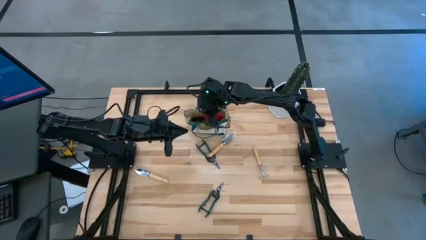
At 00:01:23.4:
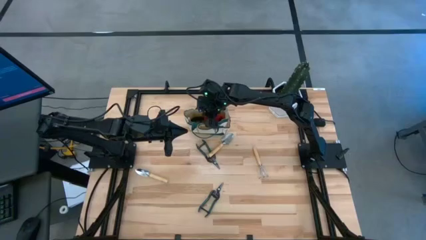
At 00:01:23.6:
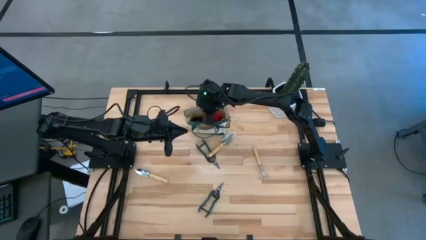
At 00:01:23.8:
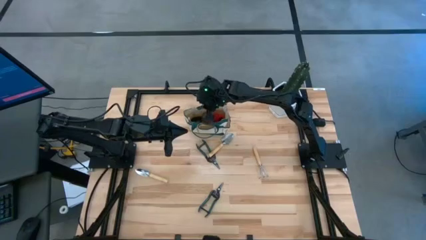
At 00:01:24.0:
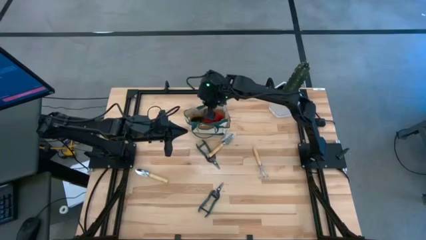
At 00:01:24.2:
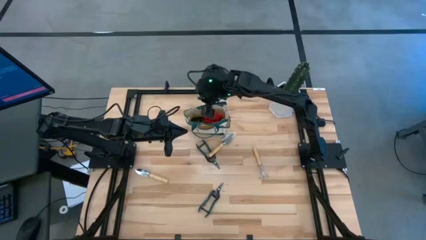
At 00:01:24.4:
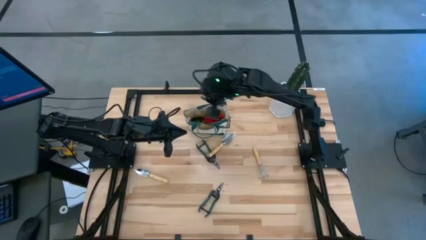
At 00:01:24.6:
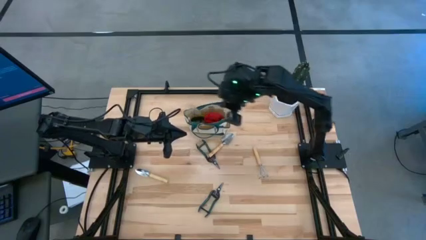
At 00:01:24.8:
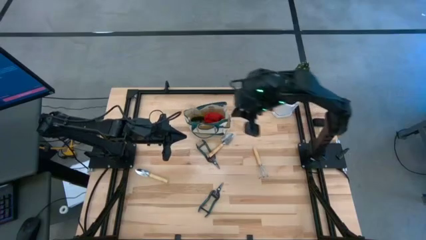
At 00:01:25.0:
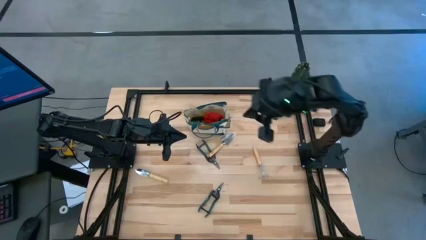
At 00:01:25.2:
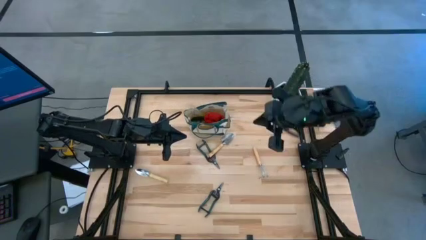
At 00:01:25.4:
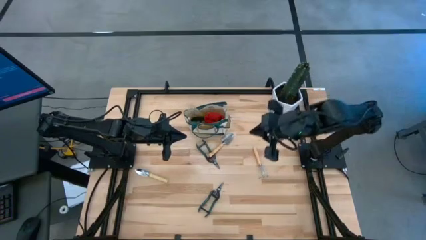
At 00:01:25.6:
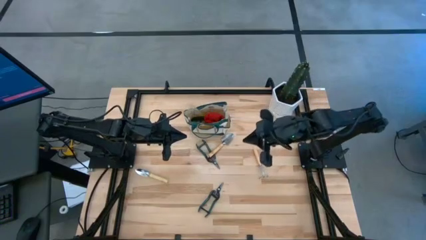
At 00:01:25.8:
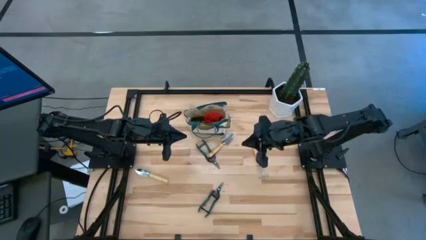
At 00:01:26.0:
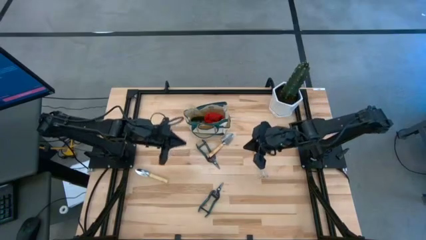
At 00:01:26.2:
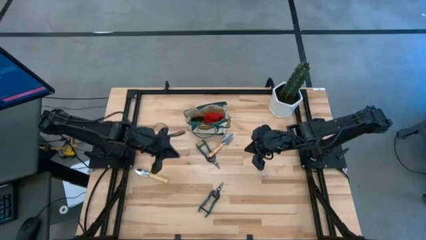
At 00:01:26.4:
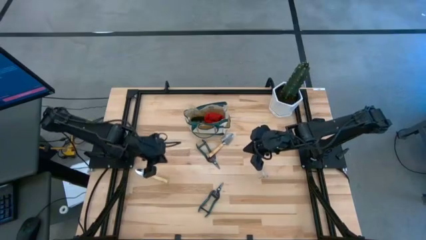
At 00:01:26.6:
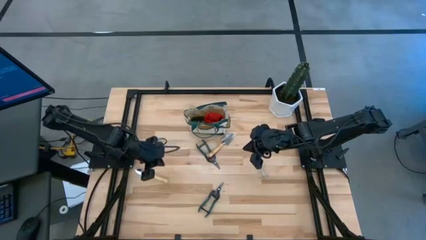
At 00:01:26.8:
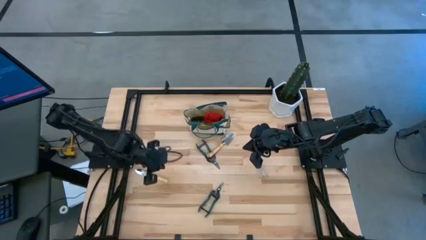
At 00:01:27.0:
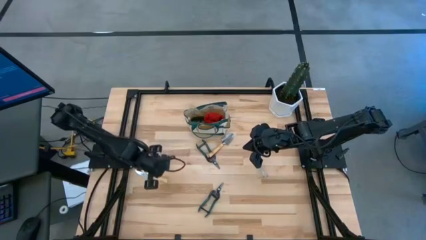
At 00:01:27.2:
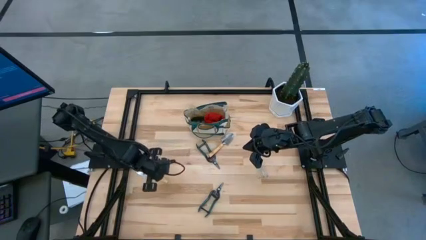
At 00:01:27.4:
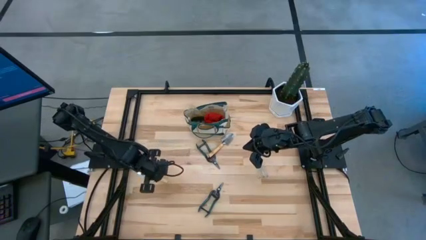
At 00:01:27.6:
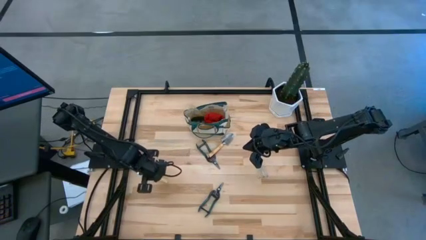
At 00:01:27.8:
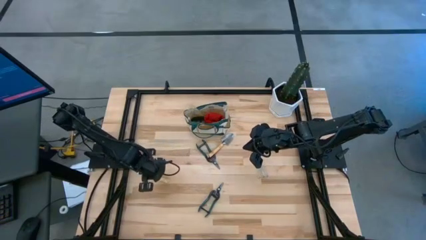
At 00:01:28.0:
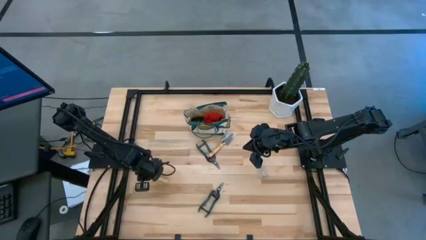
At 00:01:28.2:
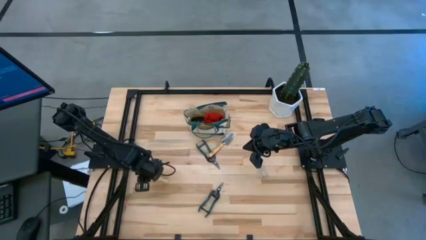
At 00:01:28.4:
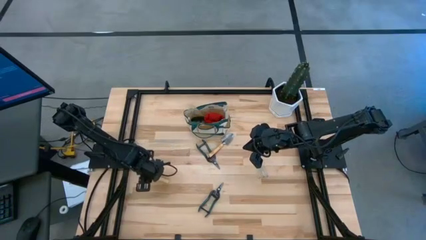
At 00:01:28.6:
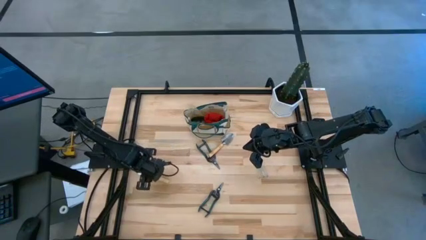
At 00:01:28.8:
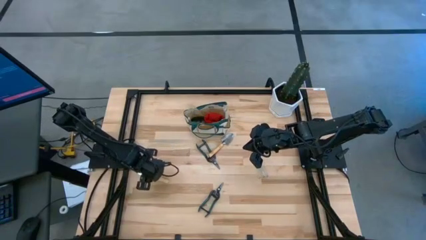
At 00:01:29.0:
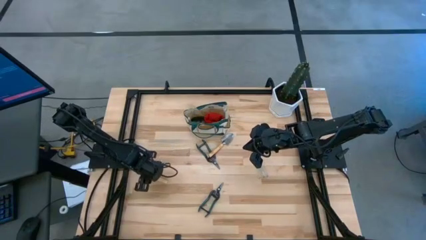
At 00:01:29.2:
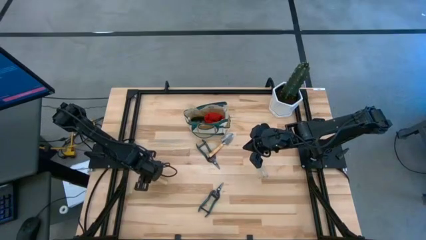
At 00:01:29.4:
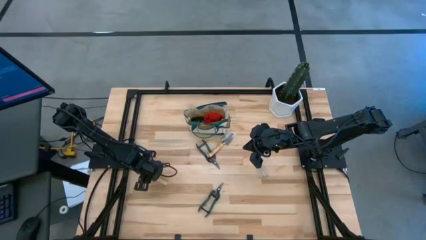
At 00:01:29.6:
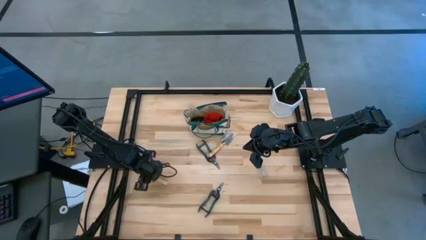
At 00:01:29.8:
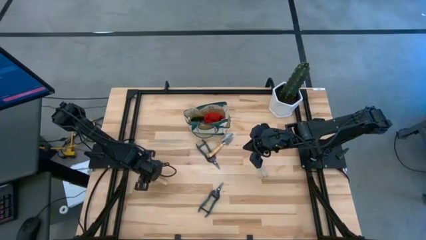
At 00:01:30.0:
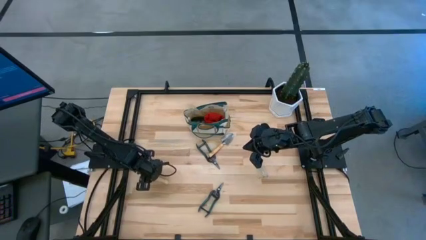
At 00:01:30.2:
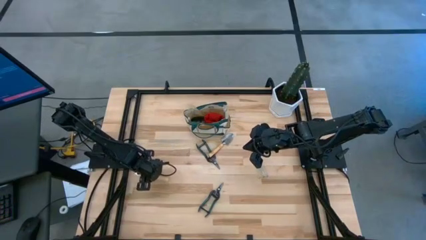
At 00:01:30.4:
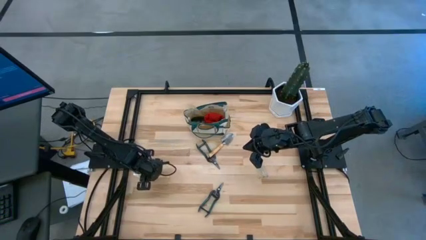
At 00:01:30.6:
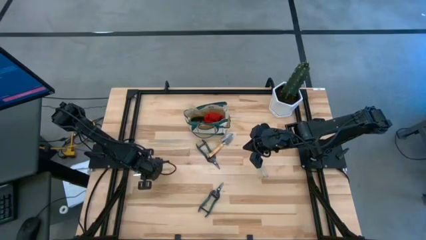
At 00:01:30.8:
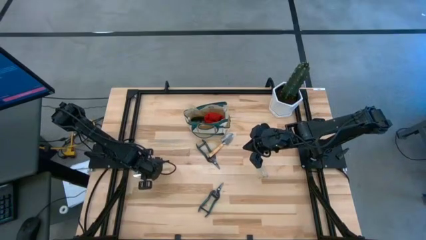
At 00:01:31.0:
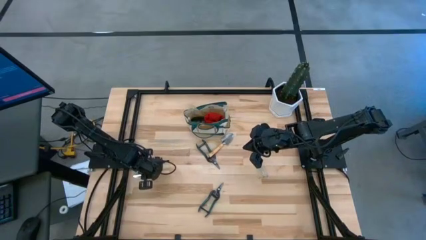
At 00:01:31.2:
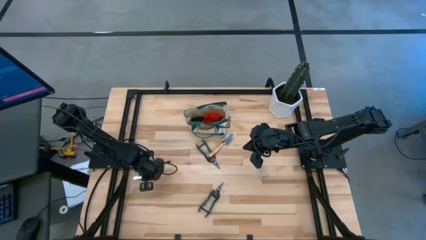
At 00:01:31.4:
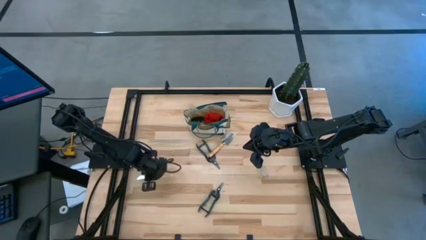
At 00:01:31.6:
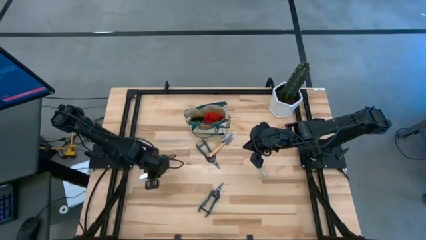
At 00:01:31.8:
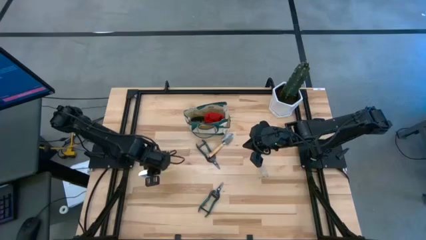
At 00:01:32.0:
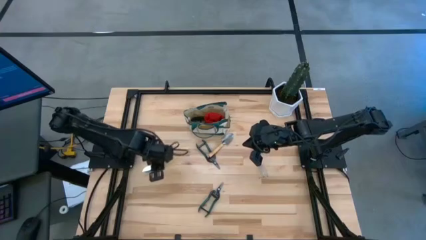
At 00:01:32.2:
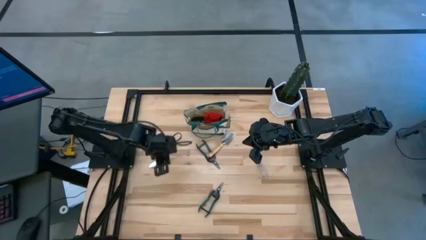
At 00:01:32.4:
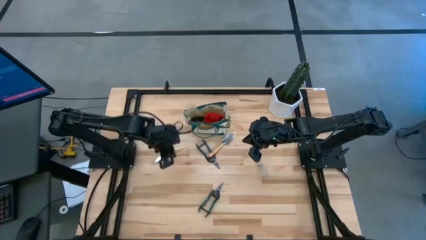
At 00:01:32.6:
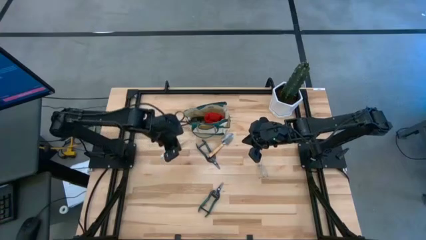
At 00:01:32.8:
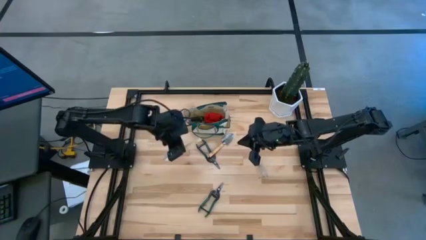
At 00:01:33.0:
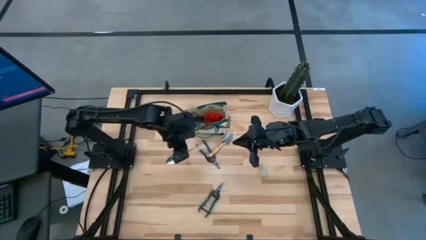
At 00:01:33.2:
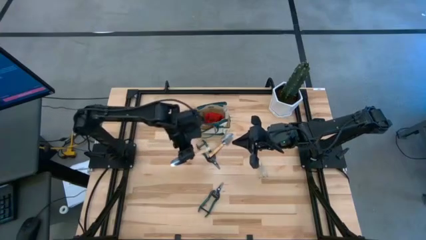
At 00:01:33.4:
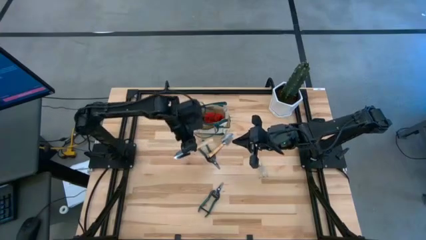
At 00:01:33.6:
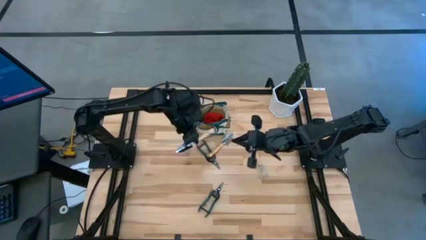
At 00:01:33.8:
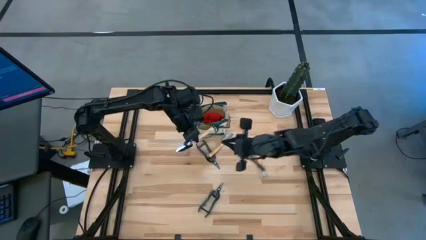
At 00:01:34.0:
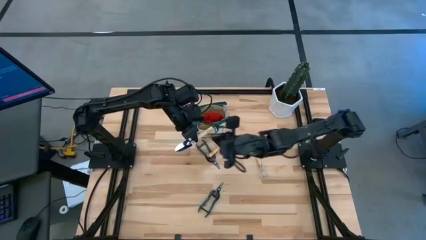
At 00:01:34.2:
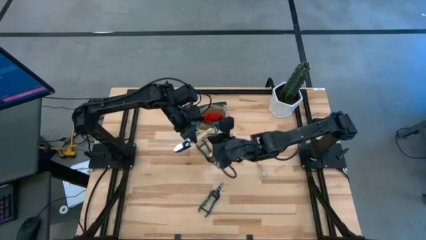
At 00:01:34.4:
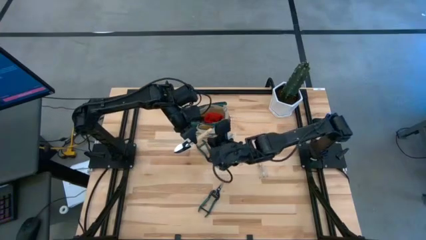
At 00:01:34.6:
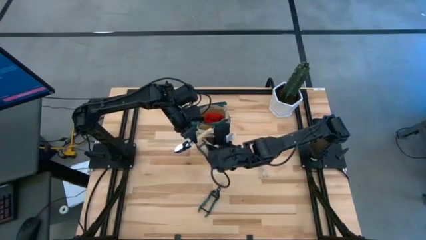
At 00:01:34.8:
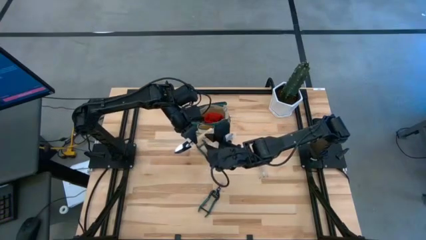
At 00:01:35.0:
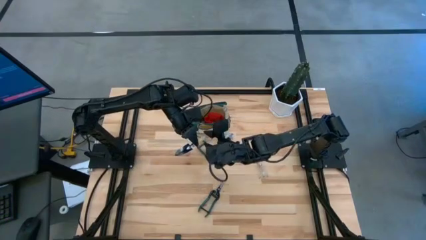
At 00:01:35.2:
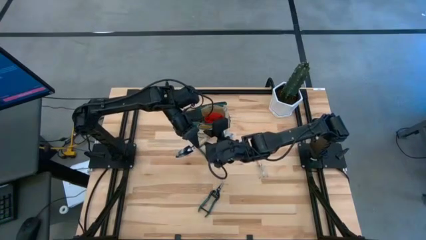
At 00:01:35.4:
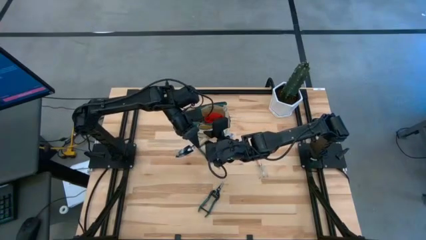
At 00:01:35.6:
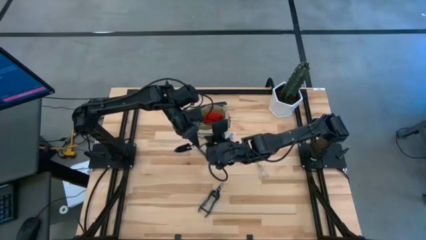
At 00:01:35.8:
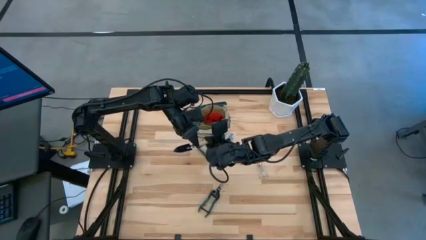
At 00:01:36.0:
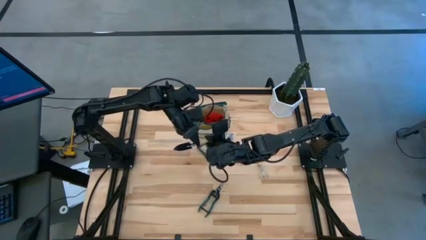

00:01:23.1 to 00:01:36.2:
Task: Pick & Place Garden tools in Gardening bag
Put the bottom brown trowel into the brown gardening bag
